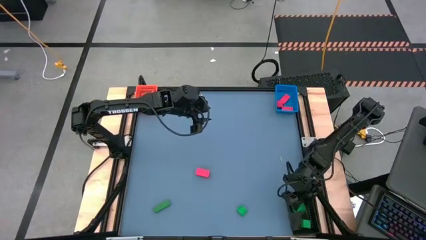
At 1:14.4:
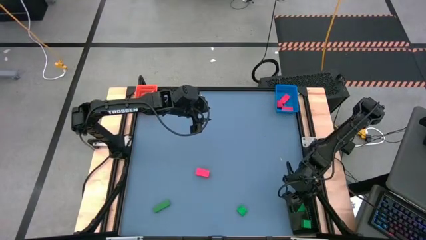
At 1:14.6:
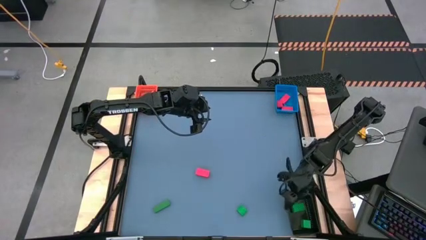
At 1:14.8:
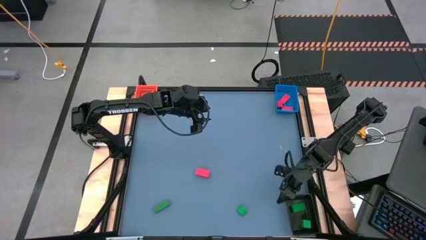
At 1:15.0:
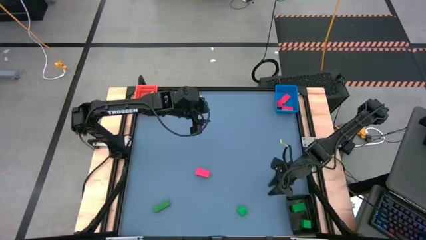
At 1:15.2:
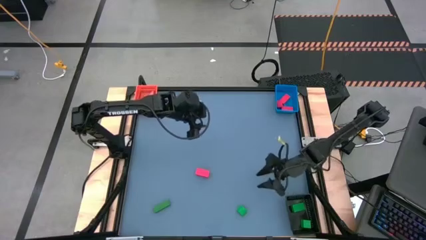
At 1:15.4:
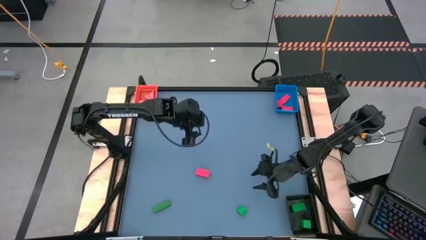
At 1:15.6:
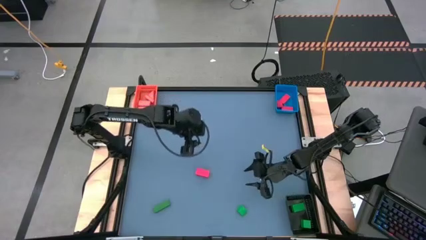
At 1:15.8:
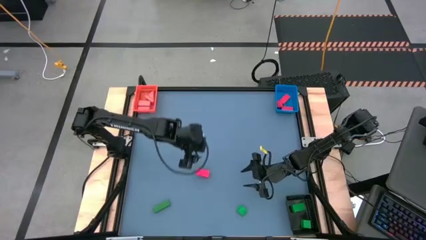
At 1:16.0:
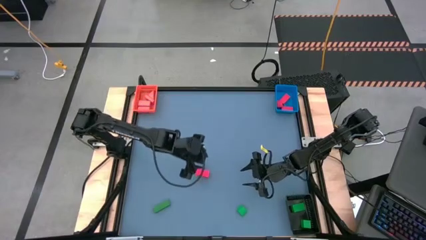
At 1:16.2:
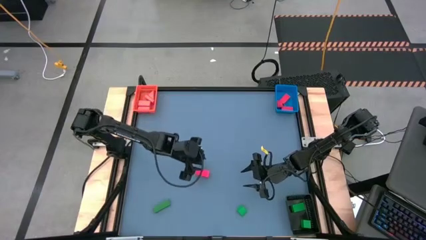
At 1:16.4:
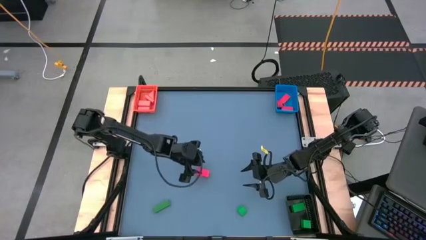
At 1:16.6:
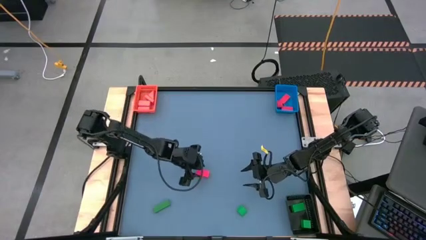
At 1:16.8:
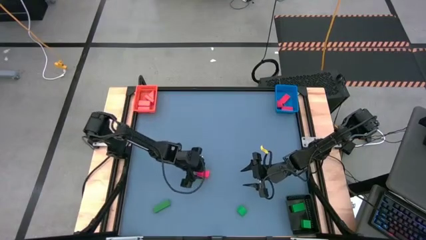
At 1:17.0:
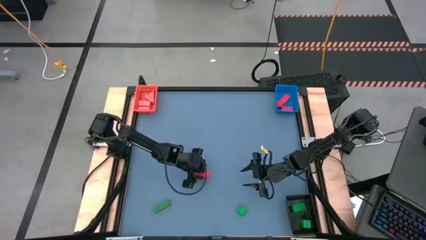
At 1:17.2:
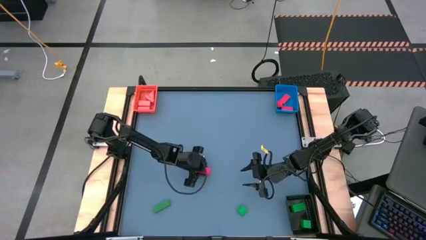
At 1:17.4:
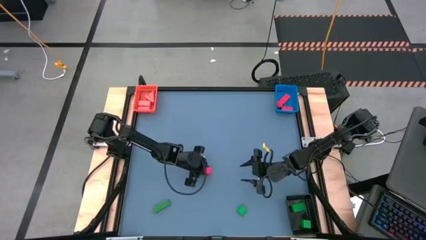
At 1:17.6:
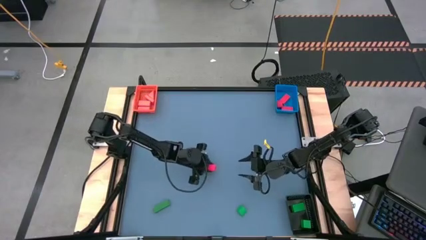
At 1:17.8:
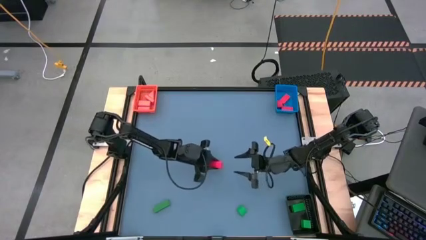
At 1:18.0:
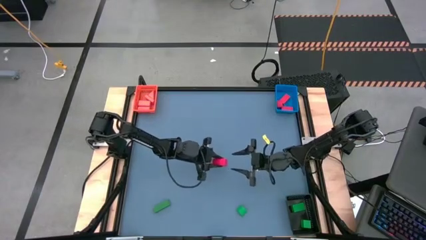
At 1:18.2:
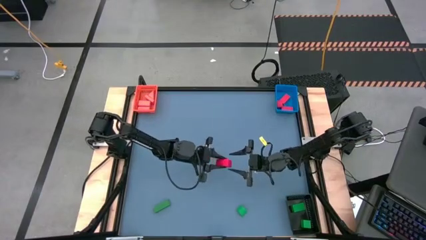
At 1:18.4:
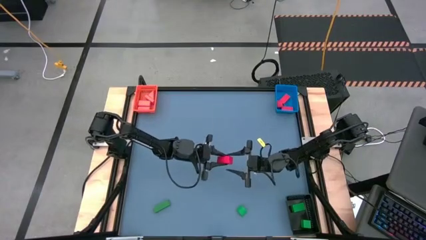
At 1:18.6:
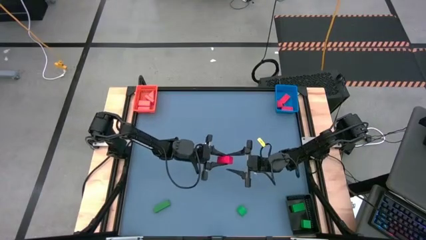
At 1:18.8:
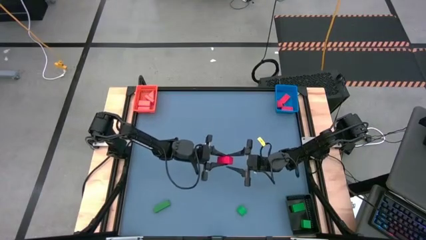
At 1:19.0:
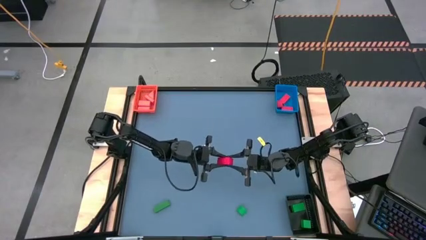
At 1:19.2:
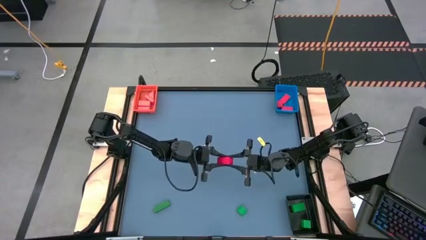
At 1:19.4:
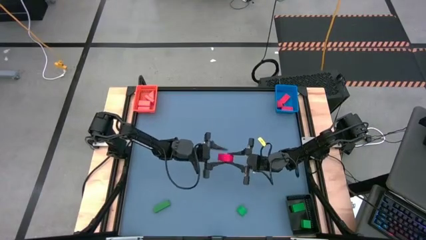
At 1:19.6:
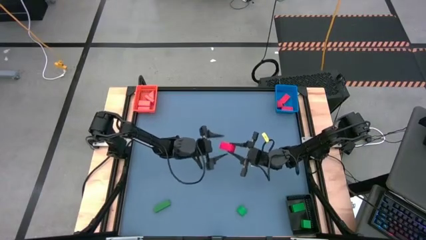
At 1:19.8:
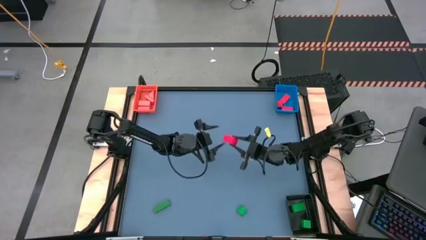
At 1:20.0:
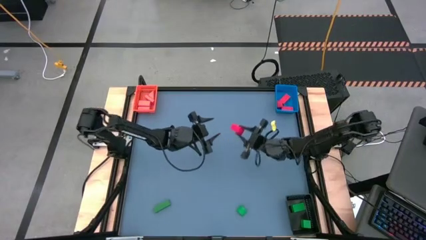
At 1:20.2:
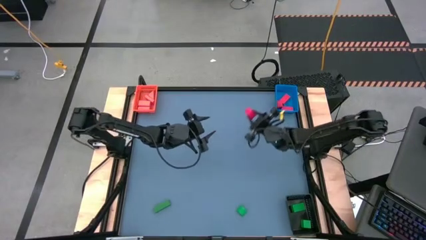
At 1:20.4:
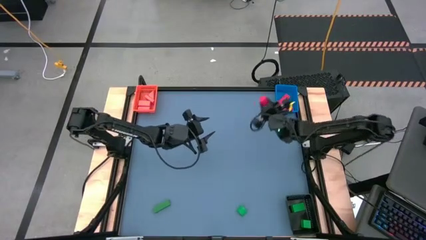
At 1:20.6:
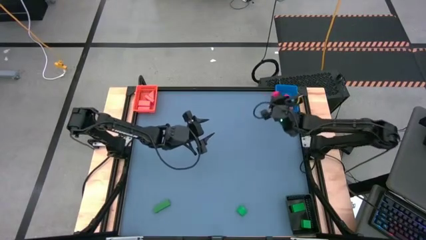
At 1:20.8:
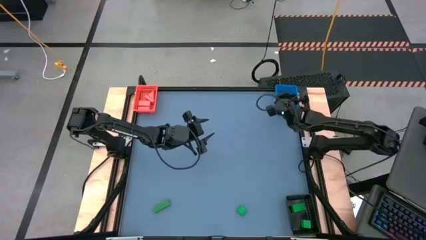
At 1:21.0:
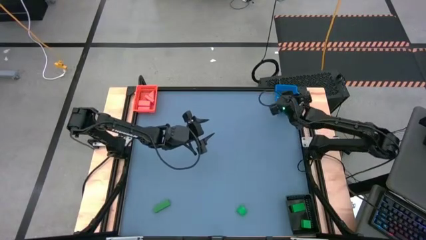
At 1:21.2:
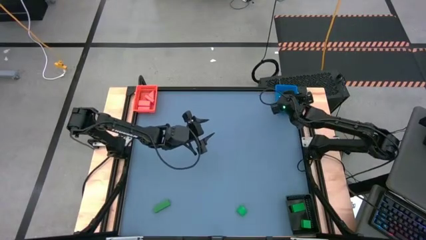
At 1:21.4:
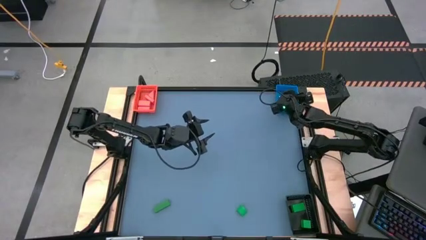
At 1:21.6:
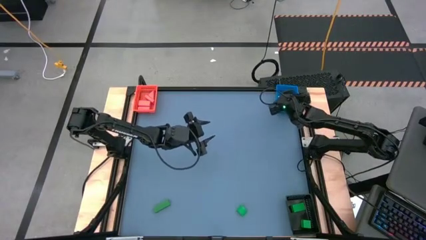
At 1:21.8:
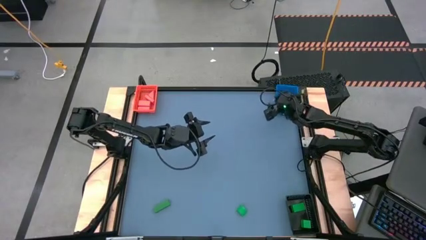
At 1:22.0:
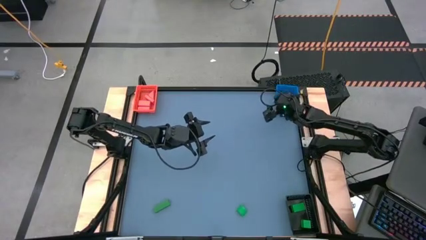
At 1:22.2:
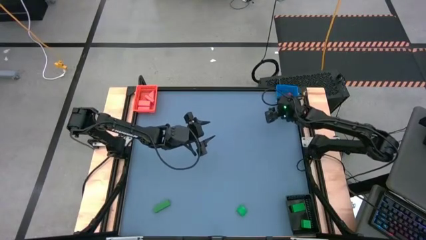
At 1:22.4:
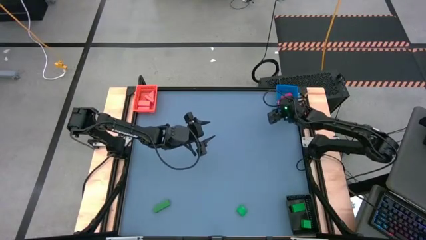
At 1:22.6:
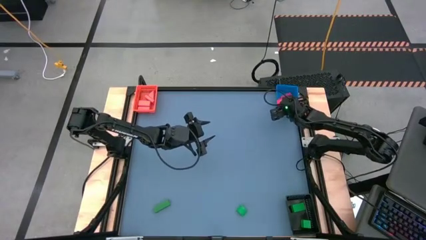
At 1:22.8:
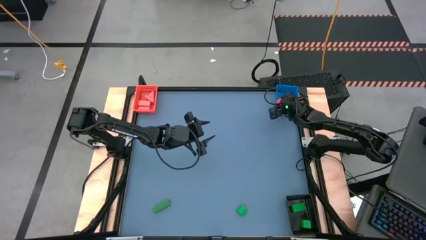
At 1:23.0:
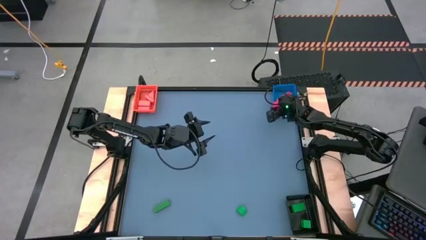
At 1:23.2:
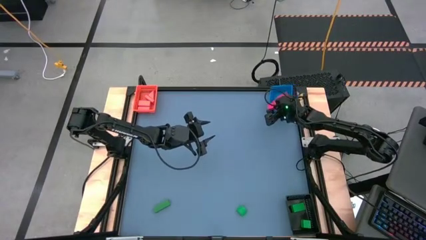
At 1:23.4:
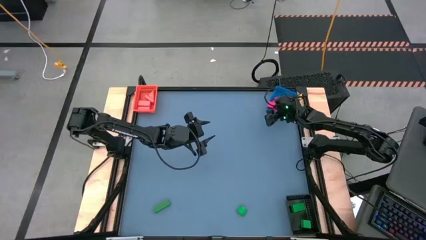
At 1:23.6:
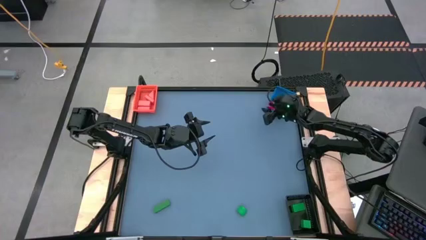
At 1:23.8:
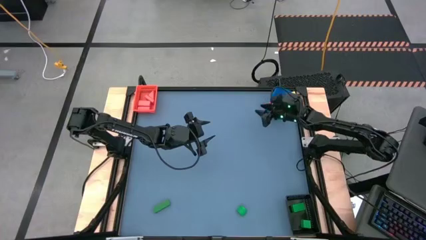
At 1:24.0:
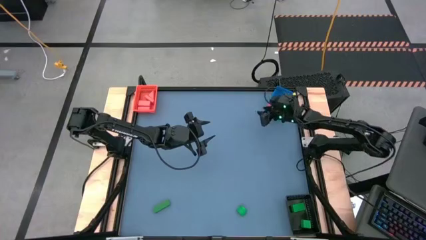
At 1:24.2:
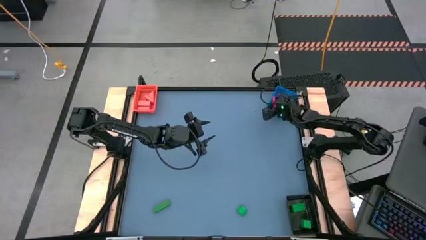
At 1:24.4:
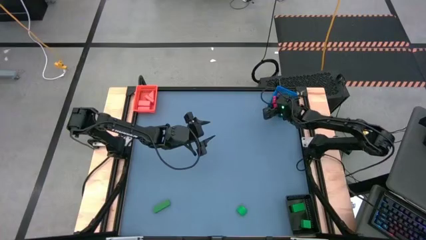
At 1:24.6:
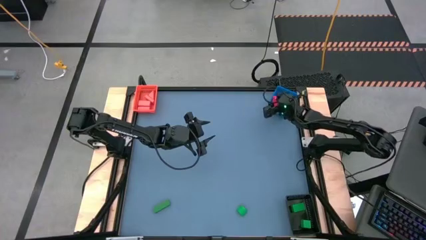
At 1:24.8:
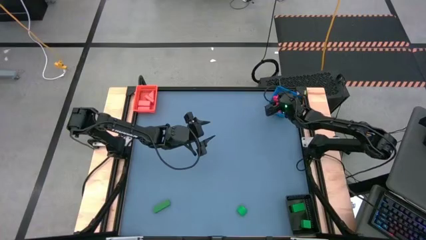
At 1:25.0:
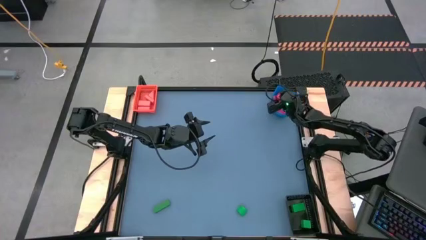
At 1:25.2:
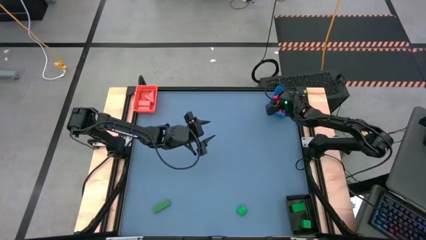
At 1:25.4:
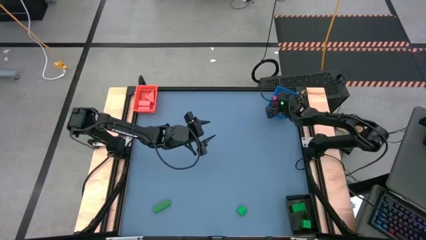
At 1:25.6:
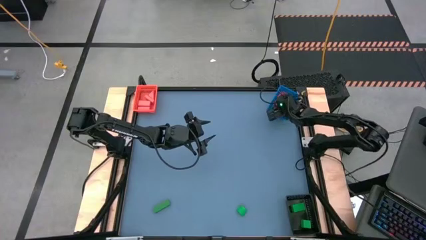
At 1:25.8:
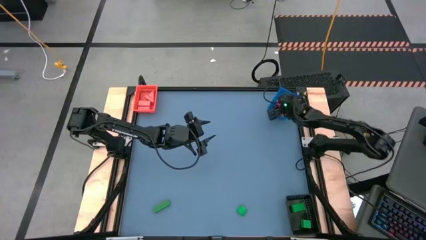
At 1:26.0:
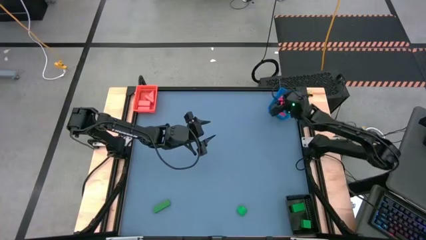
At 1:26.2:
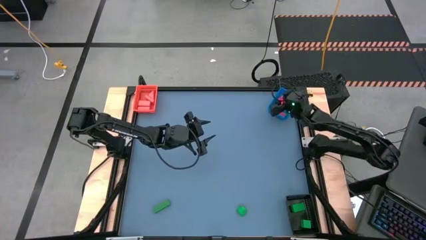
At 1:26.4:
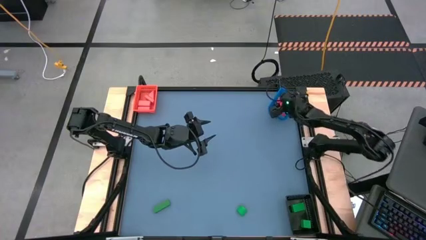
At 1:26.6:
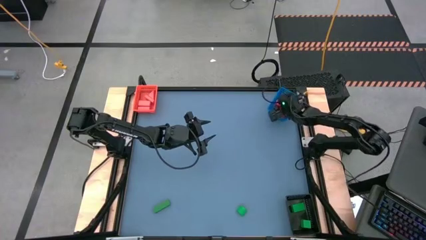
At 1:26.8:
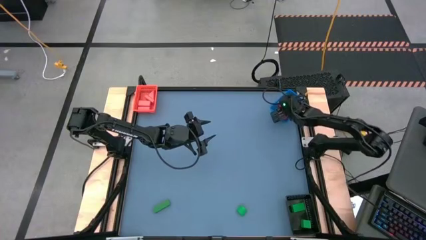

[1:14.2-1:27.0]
Task: Sort & place blocks by color
Put the pink block into the blue bin

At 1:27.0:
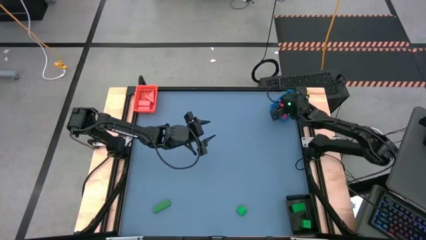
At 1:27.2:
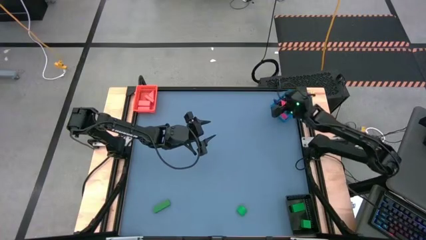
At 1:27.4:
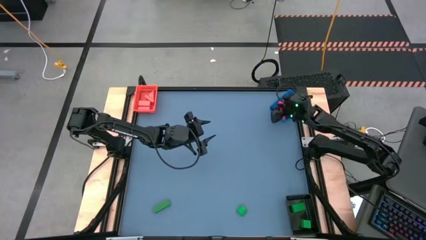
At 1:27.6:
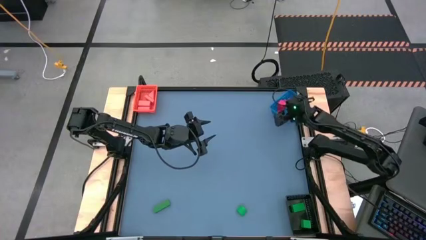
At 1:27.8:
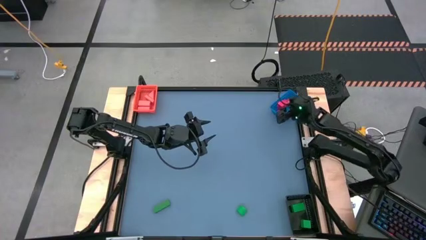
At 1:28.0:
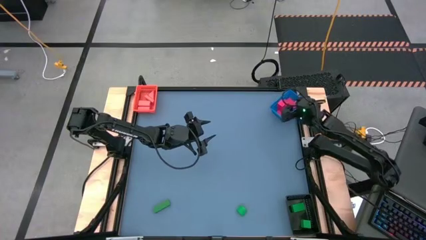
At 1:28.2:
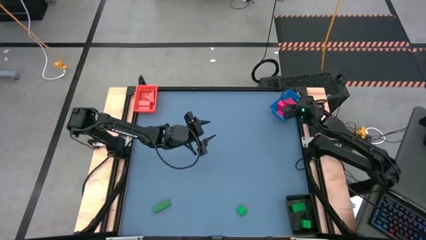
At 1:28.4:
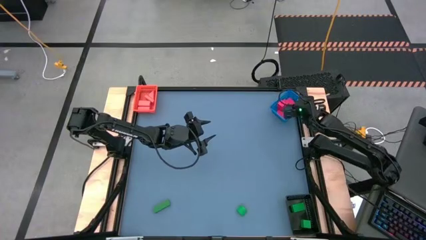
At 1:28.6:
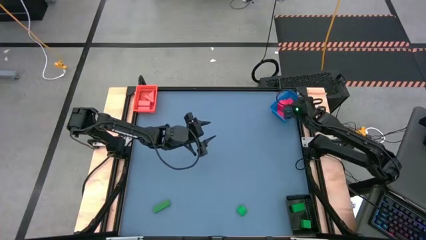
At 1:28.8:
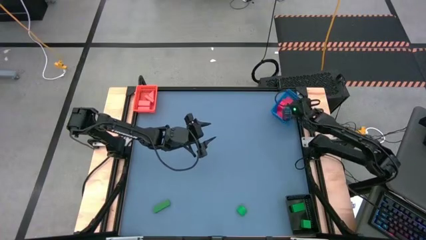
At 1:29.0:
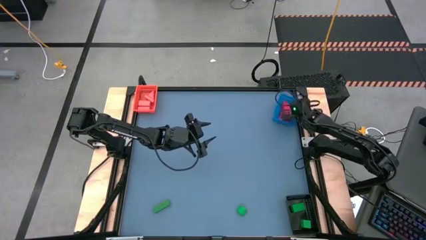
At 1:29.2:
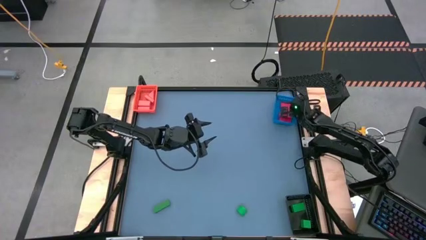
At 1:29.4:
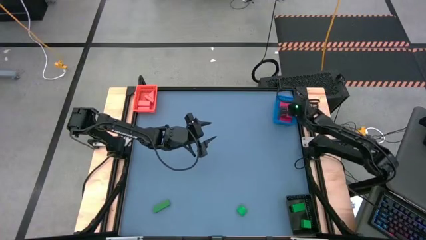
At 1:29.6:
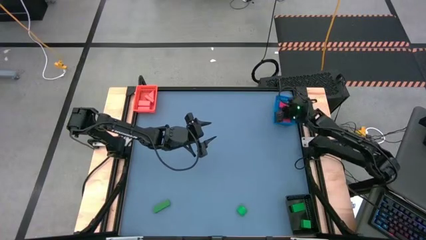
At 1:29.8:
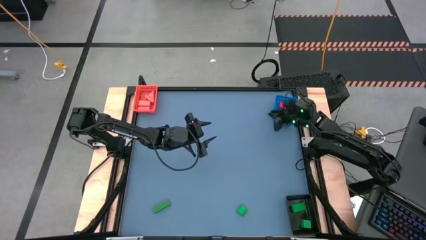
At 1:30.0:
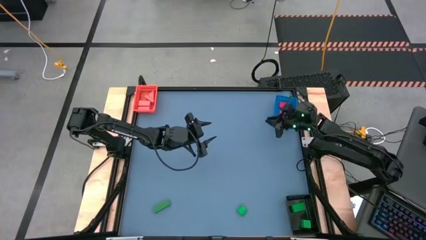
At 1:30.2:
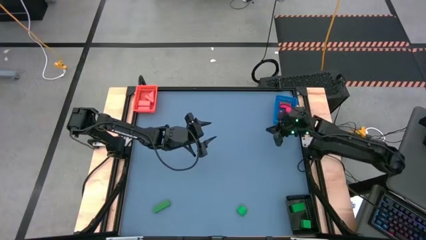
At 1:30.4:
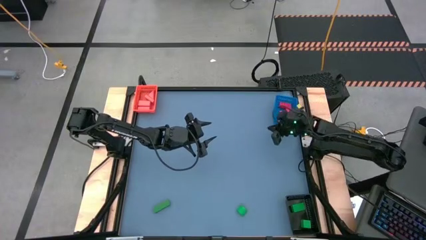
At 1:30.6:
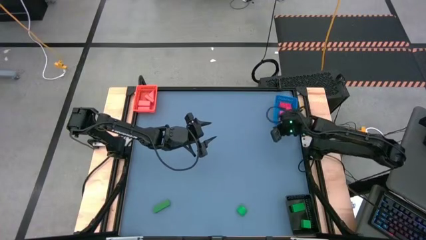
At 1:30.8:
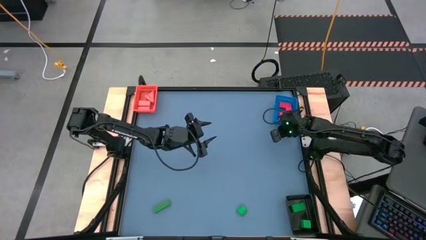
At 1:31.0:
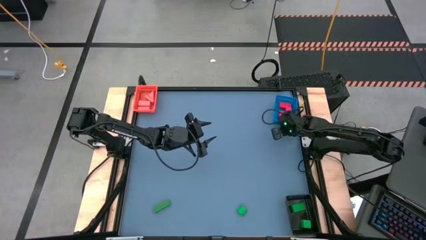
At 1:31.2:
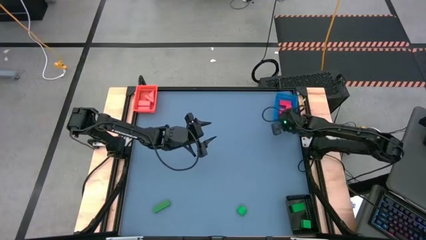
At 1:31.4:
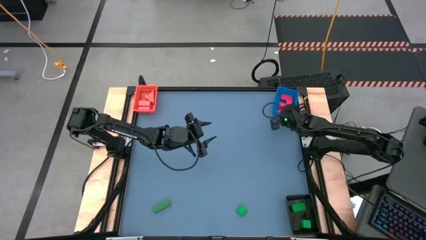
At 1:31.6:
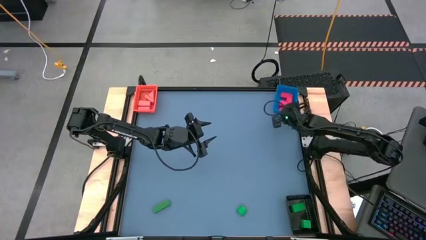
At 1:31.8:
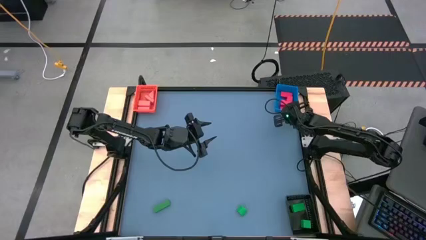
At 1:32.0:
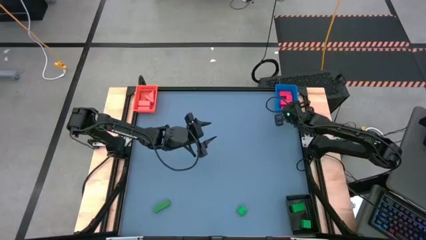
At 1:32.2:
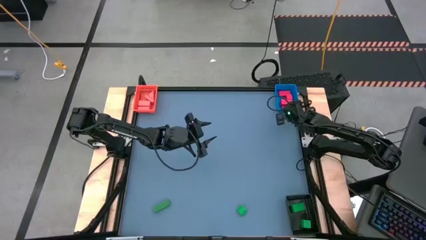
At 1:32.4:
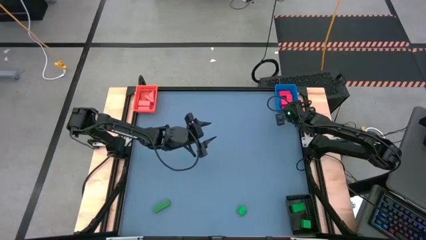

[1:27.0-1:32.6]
Adjust the blue bin
